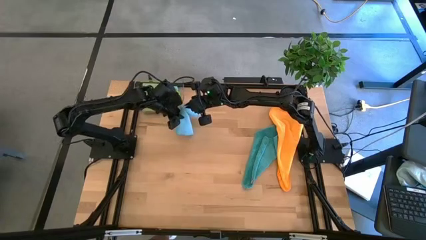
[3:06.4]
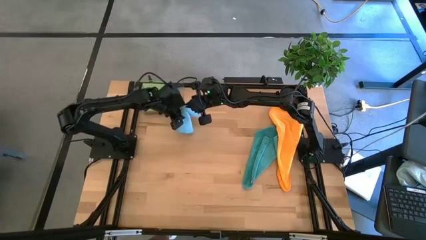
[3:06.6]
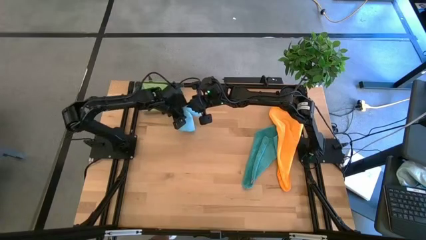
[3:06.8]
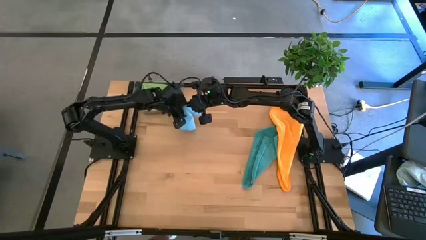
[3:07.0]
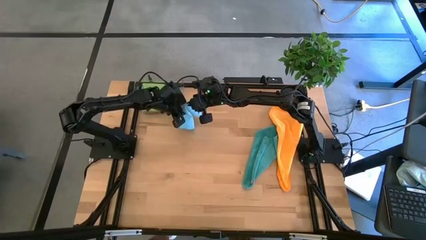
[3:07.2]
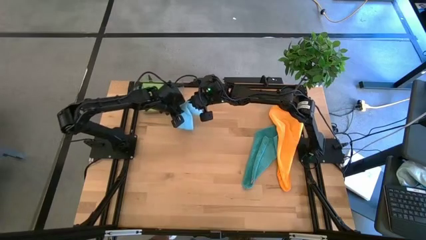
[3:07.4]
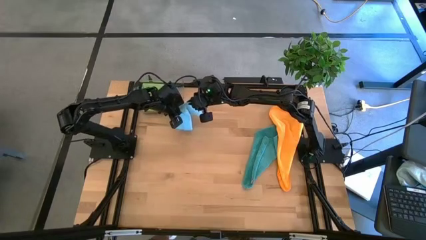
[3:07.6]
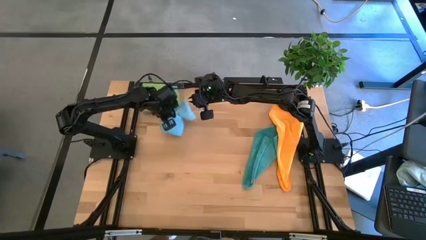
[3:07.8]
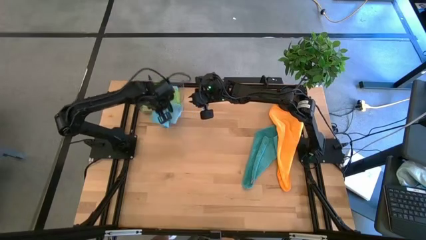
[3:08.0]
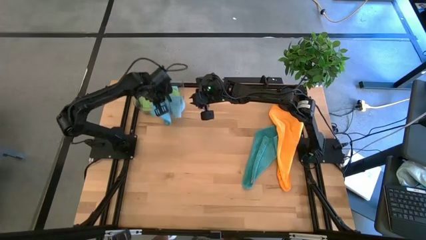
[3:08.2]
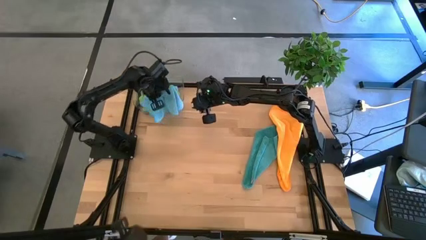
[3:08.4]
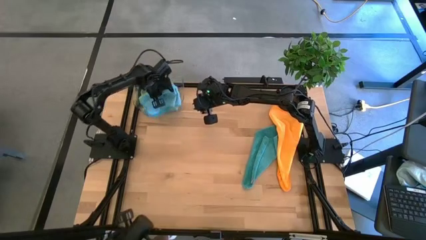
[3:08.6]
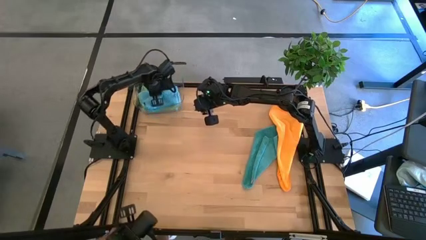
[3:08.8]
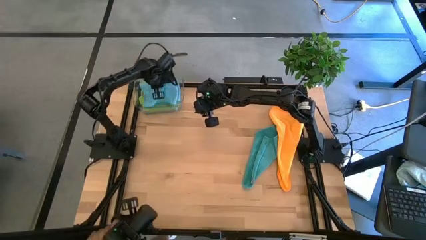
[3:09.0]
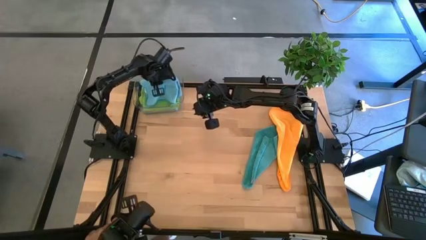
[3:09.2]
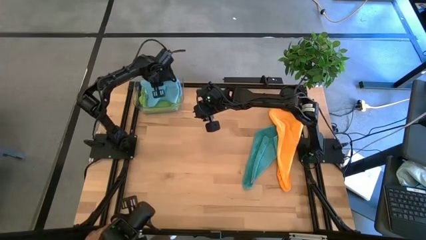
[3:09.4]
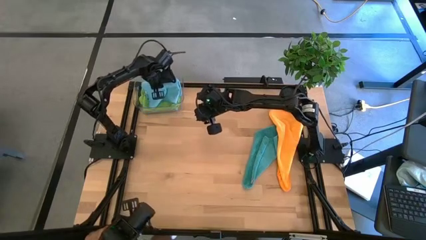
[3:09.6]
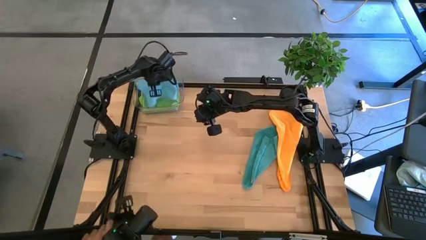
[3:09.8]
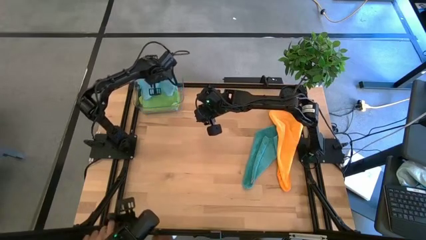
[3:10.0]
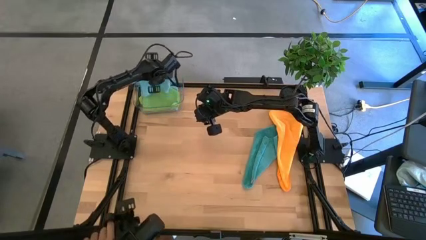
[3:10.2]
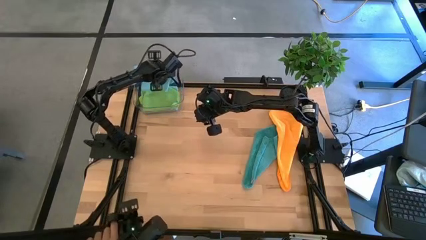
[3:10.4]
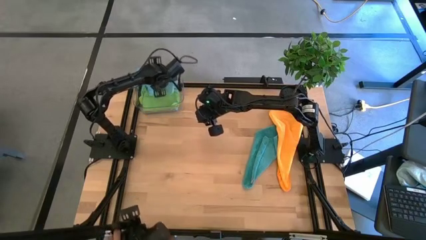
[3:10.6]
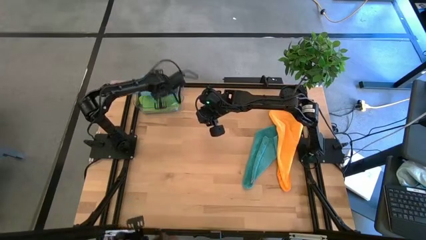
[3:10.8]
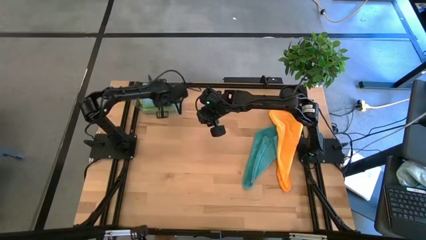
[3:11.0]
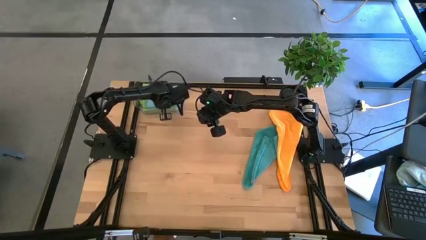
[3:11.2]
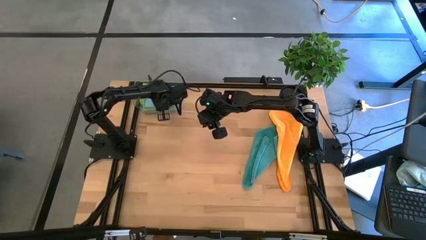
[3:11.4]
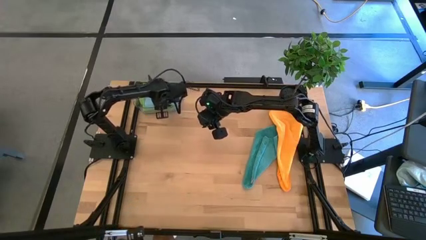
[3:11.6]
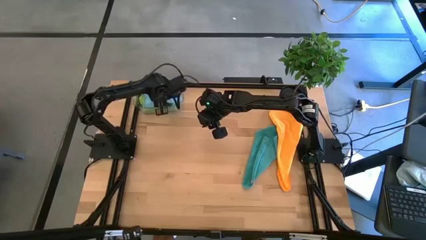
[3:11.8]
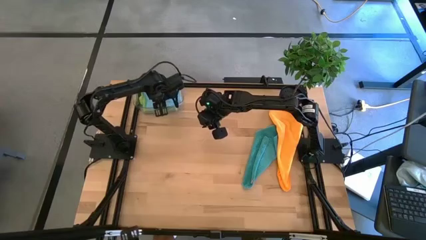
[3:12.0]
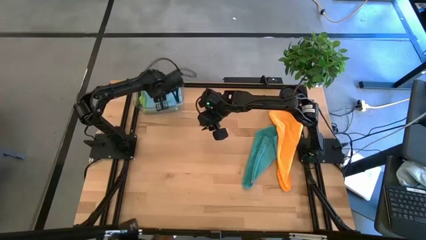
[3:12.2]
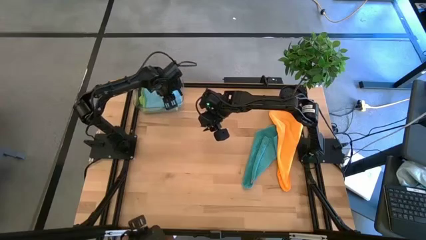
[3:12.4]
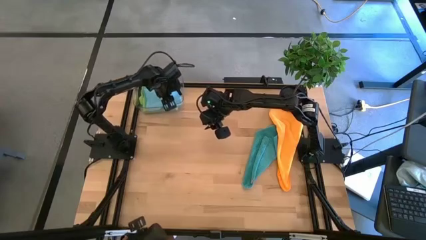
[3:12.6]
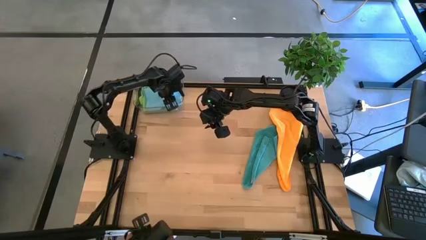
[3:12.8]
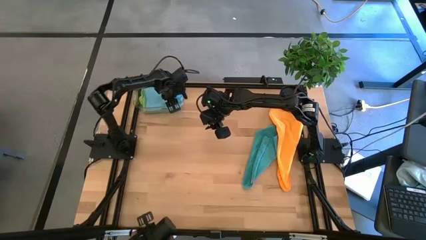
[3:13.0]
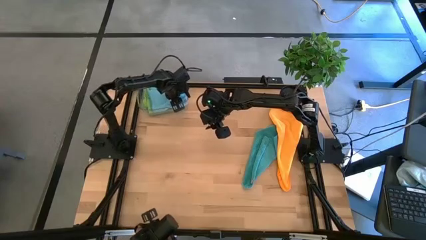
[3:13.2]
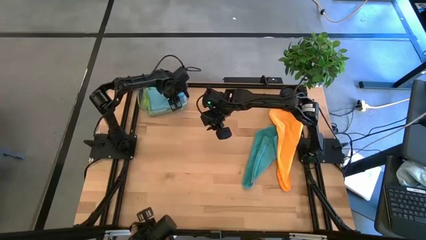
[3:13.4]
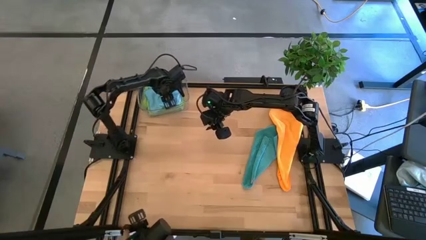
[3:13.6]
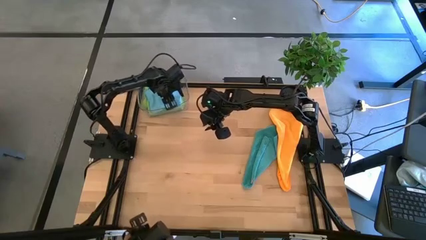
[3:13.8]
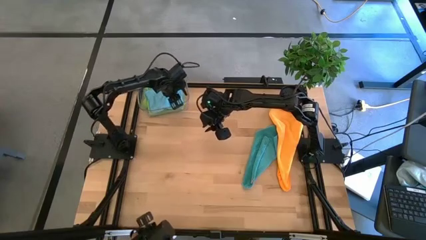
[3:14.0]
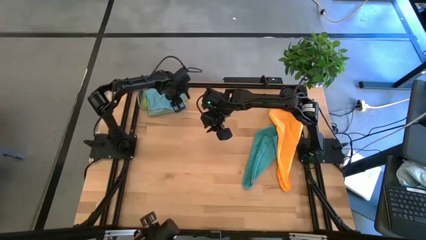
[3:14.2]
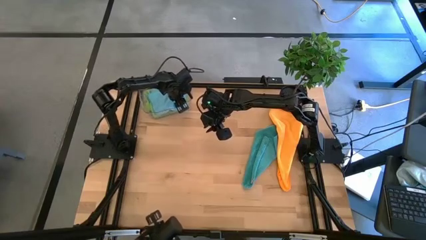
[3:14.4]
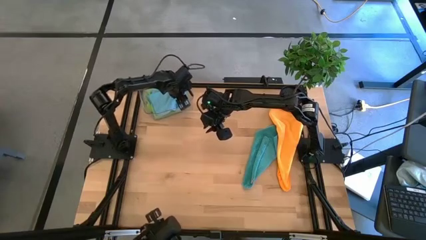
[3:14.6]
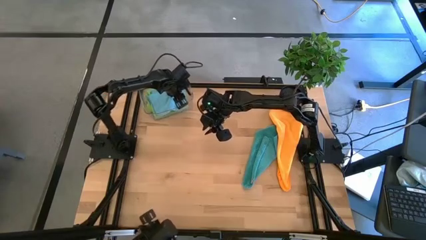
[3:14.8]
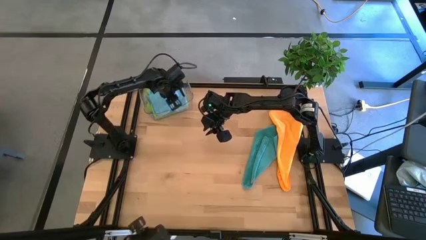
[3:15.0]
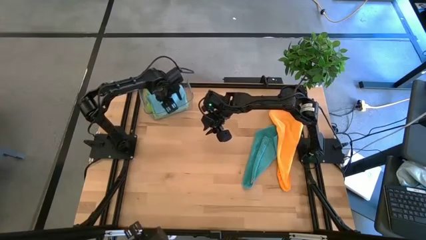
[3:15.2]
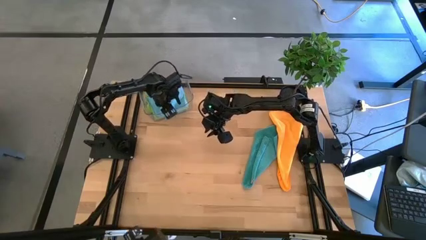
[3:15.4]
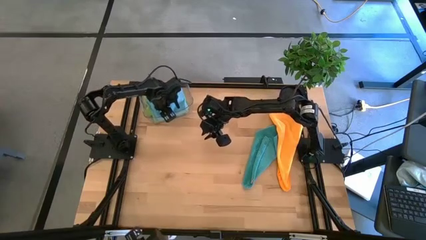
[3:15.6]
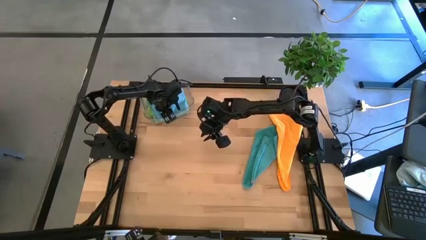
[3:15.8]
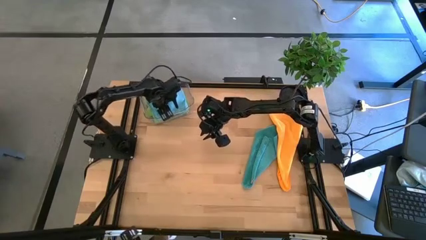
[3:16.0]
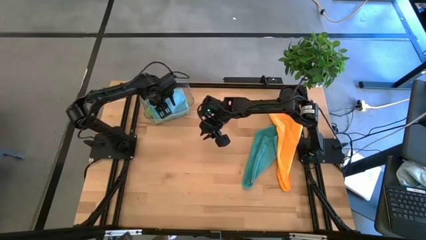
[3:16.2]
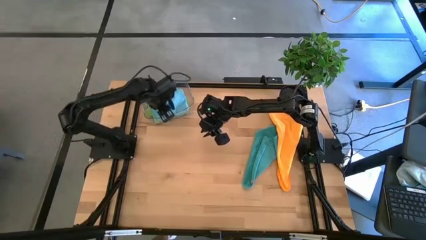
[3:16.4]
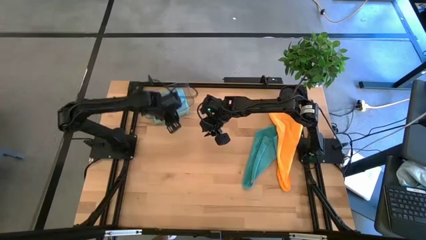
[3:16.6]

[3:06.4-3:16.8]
Task: Fold microfiber towels
Stack the light blue microfiber cloth on top of the green microfiber cloth in the transparent bin

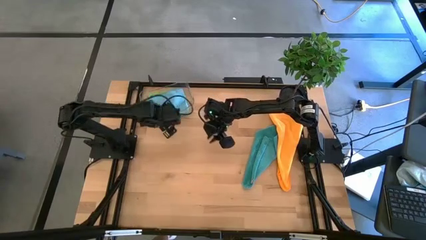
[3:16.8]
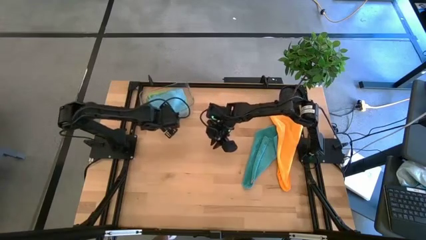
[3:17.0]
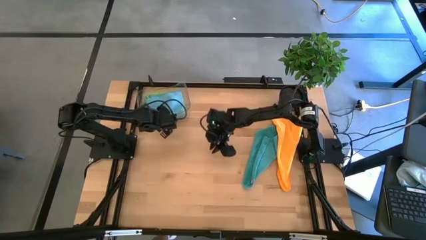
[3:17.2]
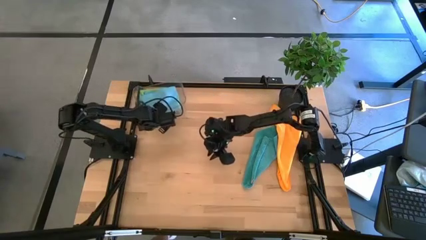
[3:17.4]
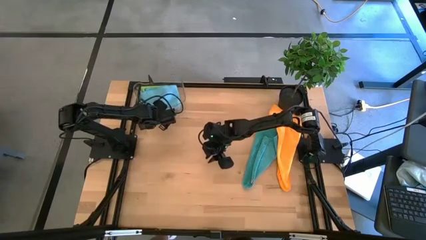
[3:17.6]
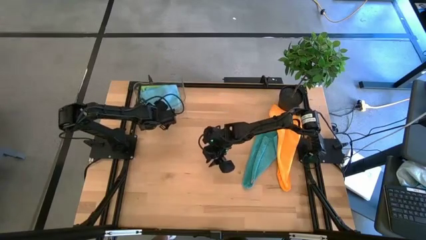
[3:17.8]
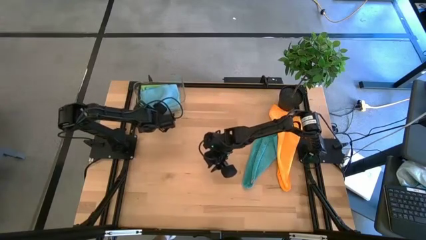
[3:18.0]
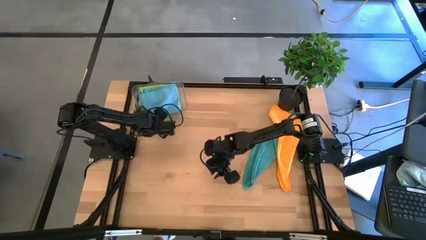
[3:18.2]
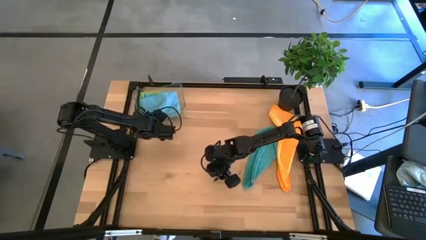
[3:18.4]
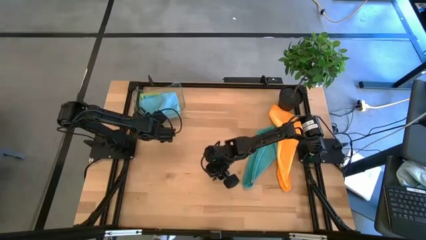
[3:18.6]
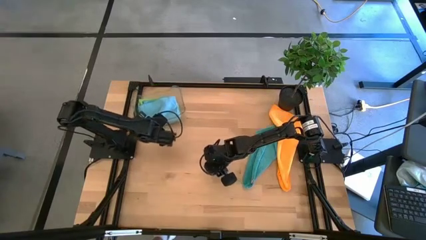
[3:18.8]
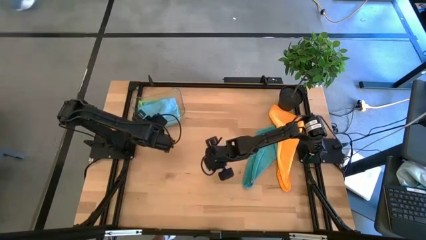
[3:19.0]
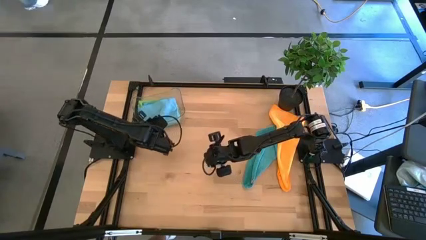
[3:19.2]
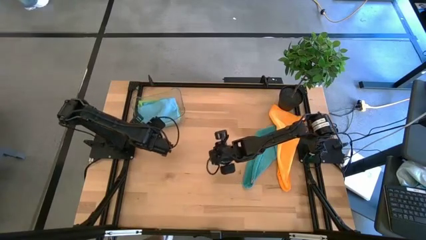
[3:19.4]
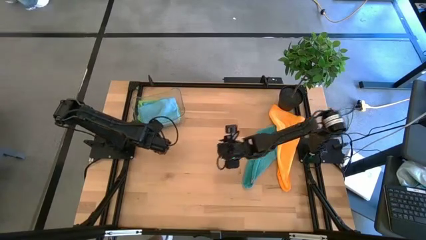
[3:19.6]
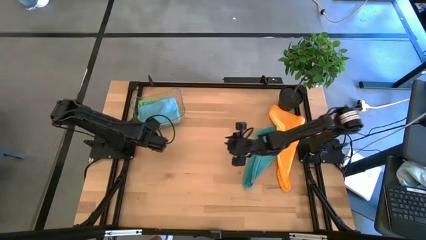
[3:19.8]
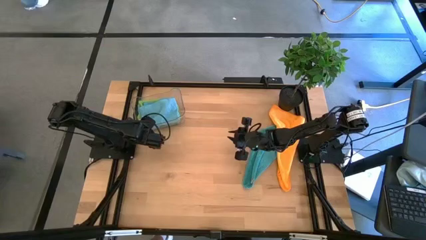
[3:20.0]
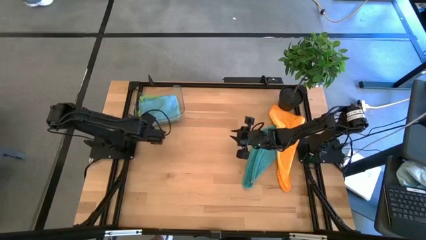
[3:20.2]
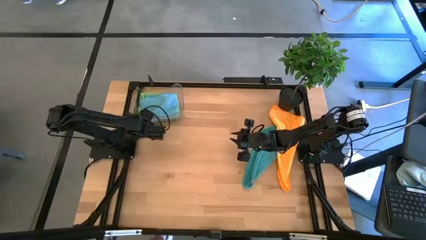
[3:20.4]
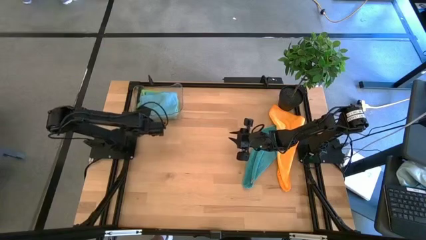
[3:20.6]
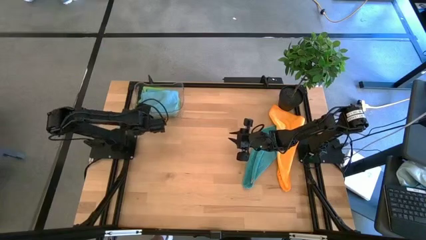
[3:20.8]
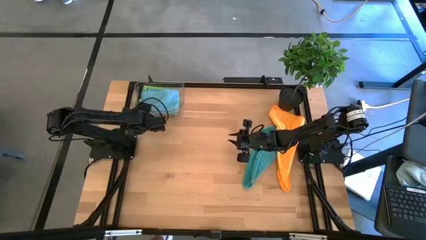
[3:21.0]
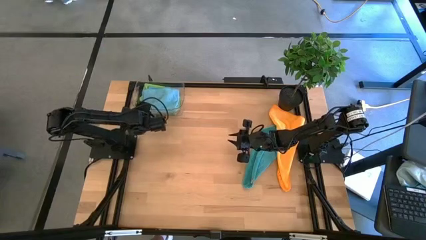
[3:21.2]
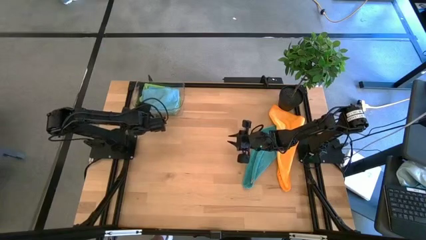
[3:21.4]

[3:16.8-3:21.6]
Adjust the transparent bin
